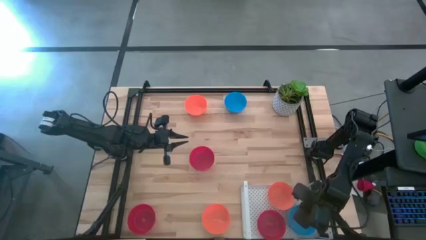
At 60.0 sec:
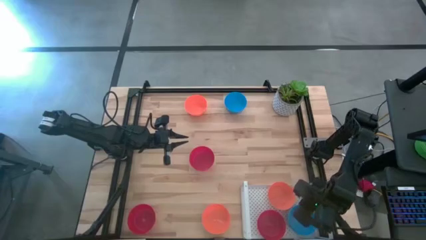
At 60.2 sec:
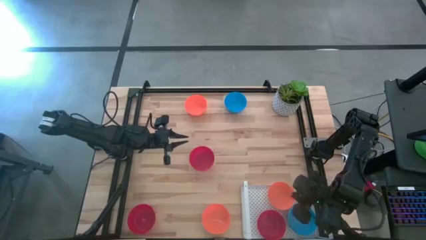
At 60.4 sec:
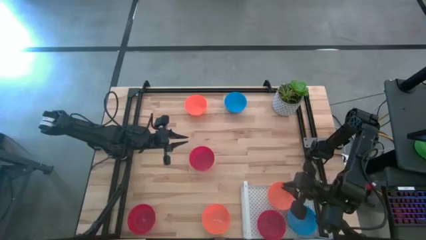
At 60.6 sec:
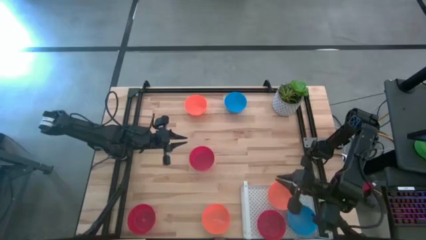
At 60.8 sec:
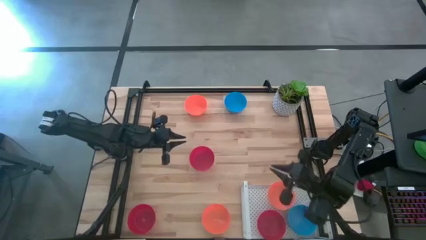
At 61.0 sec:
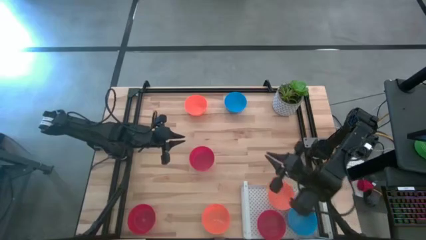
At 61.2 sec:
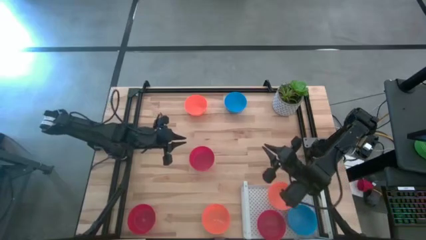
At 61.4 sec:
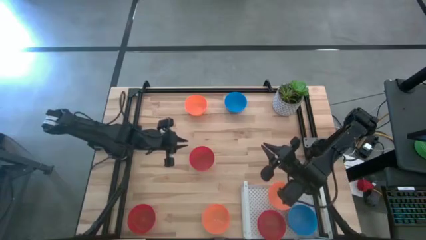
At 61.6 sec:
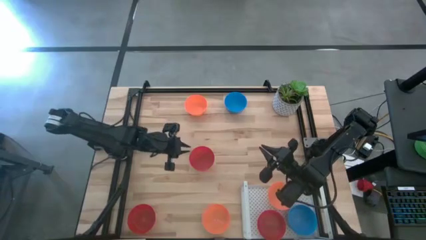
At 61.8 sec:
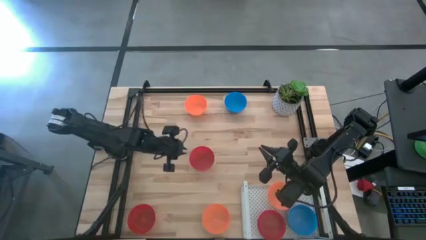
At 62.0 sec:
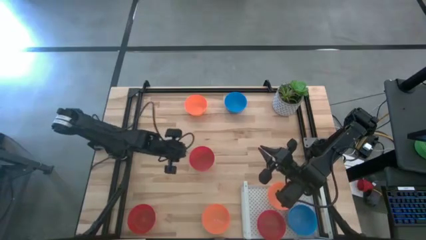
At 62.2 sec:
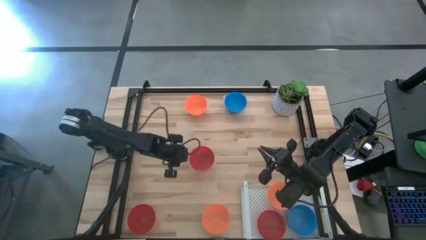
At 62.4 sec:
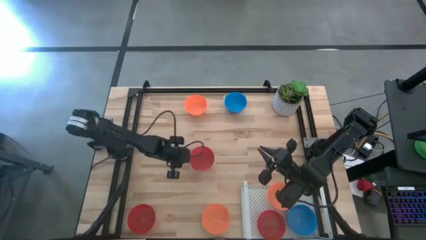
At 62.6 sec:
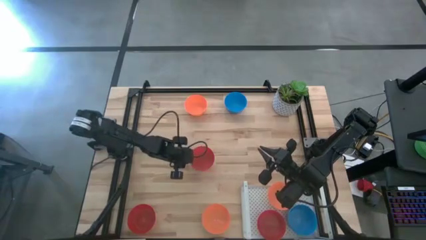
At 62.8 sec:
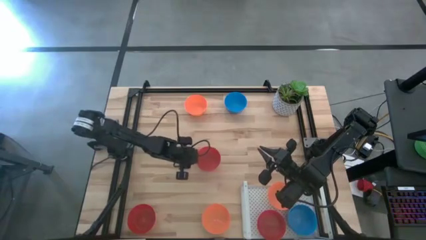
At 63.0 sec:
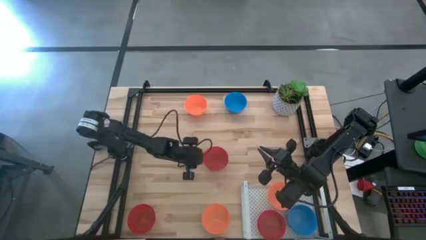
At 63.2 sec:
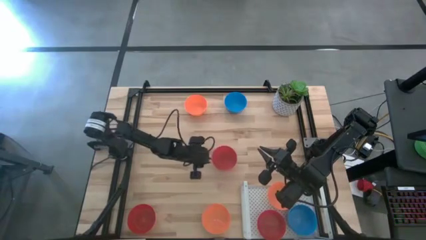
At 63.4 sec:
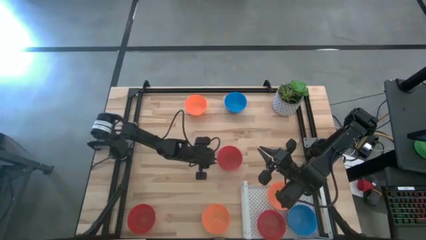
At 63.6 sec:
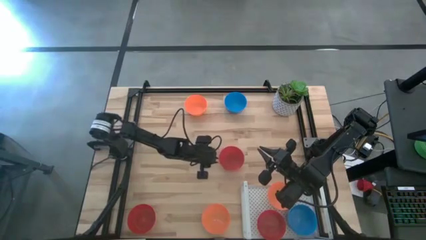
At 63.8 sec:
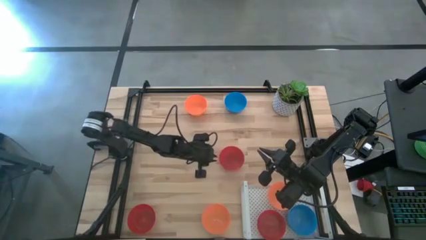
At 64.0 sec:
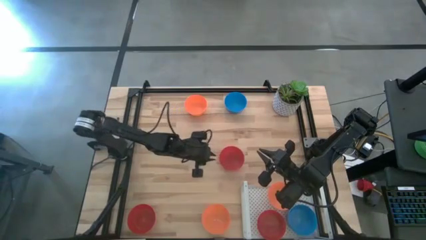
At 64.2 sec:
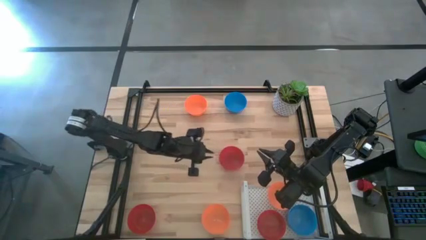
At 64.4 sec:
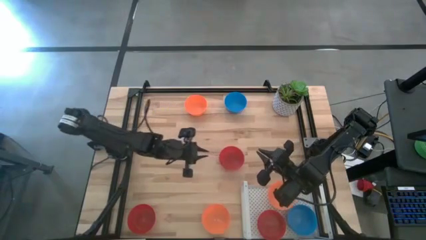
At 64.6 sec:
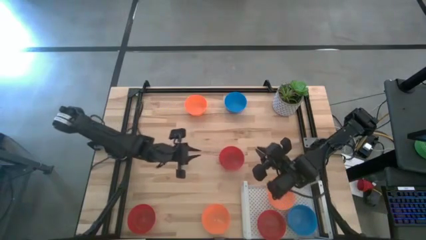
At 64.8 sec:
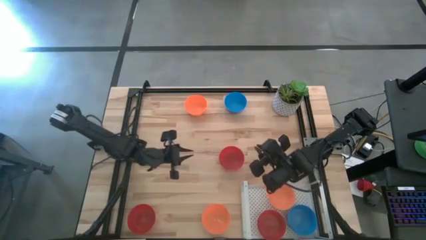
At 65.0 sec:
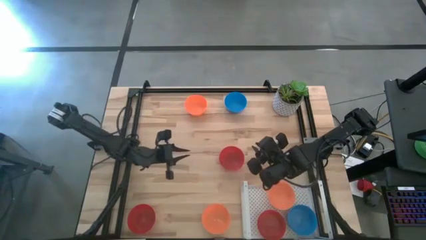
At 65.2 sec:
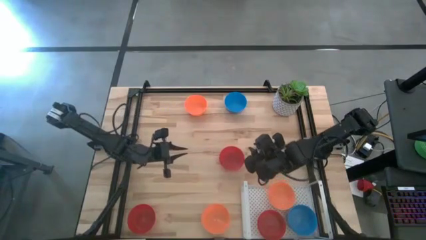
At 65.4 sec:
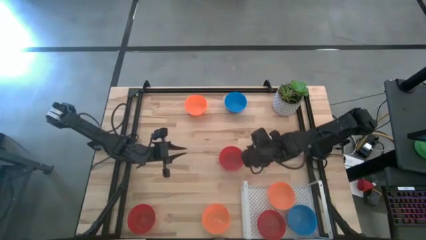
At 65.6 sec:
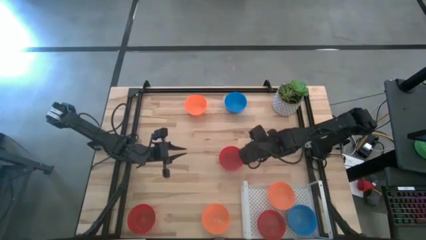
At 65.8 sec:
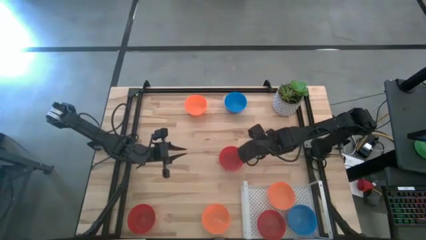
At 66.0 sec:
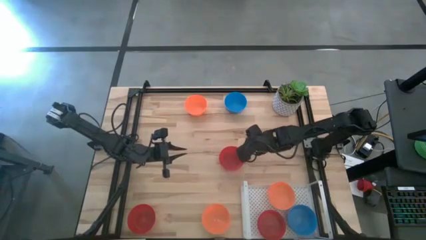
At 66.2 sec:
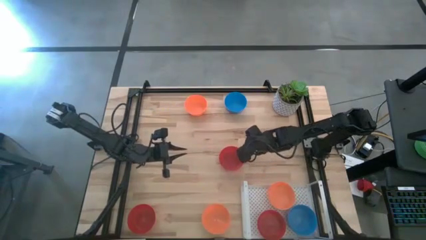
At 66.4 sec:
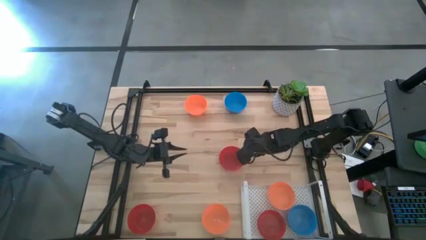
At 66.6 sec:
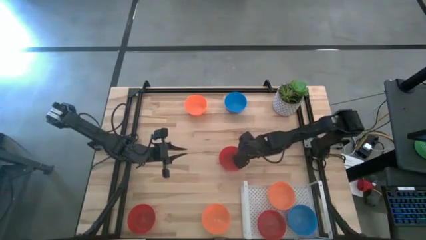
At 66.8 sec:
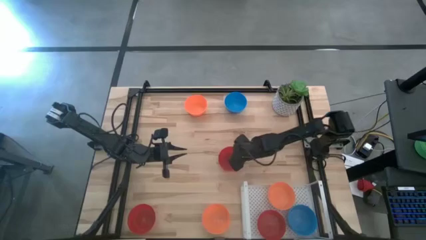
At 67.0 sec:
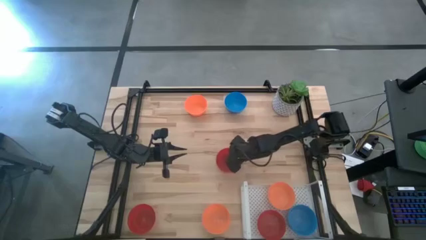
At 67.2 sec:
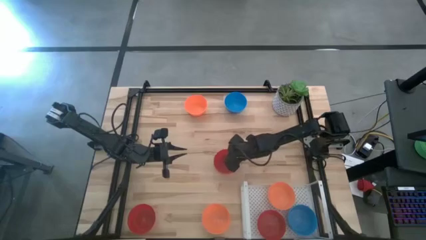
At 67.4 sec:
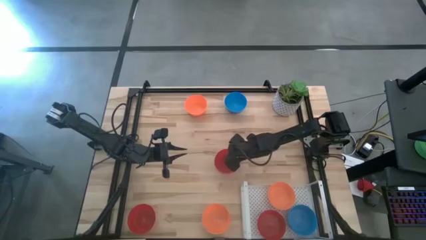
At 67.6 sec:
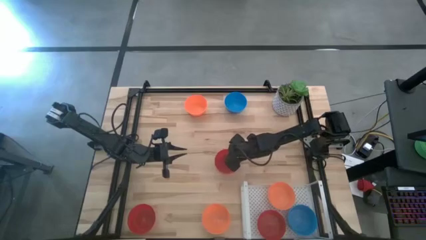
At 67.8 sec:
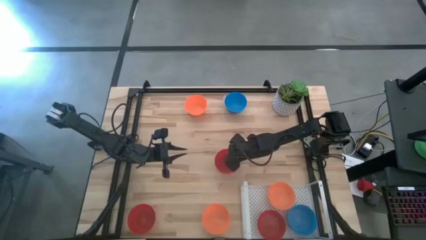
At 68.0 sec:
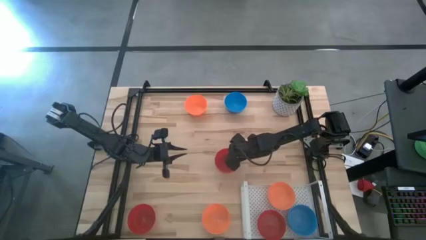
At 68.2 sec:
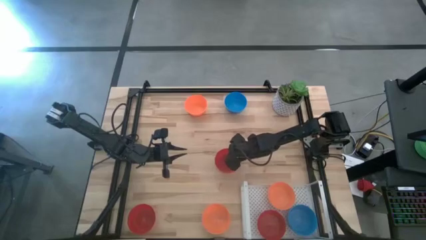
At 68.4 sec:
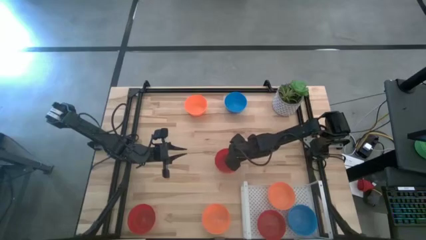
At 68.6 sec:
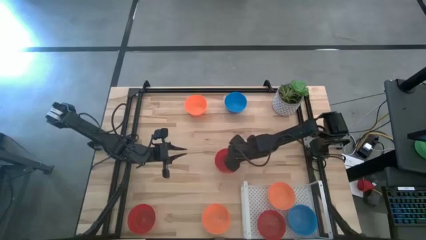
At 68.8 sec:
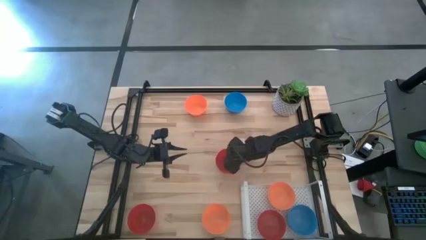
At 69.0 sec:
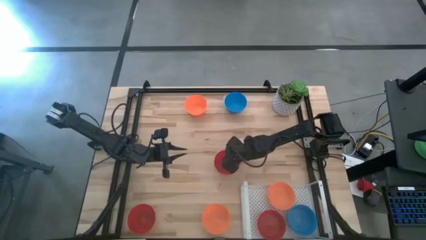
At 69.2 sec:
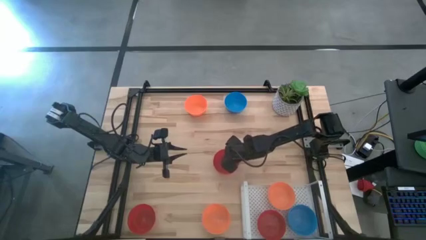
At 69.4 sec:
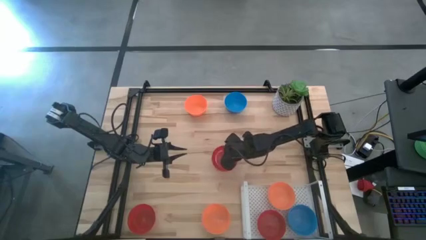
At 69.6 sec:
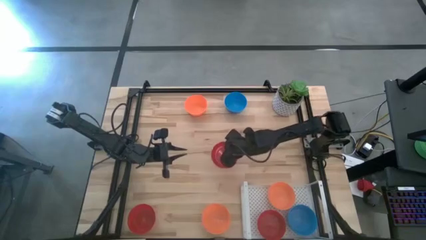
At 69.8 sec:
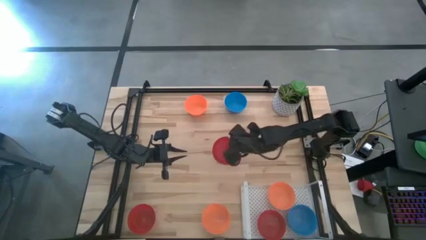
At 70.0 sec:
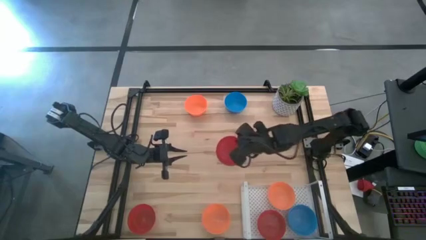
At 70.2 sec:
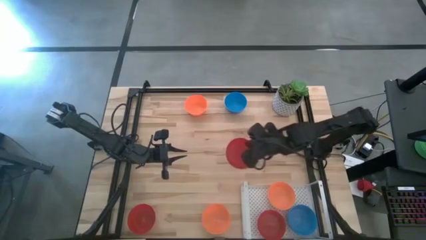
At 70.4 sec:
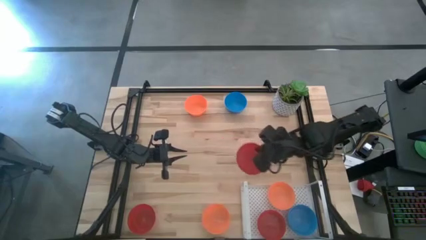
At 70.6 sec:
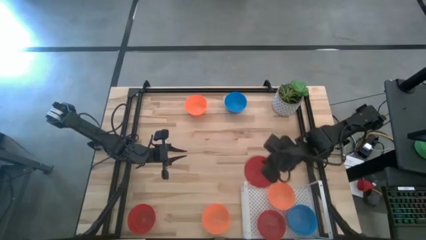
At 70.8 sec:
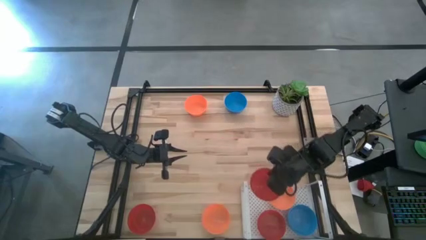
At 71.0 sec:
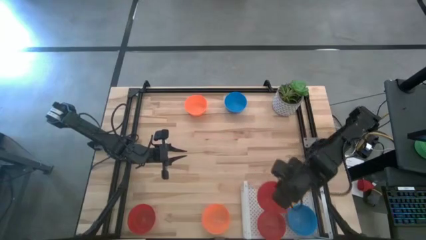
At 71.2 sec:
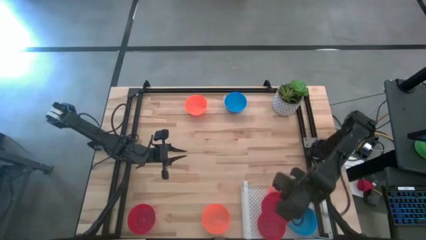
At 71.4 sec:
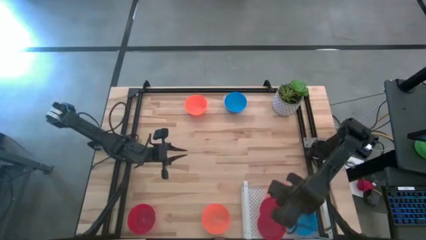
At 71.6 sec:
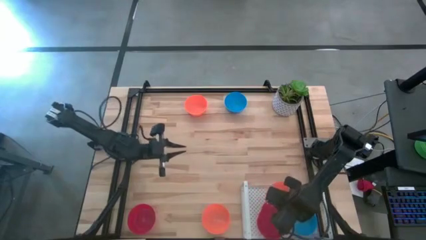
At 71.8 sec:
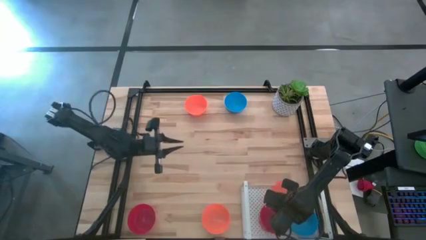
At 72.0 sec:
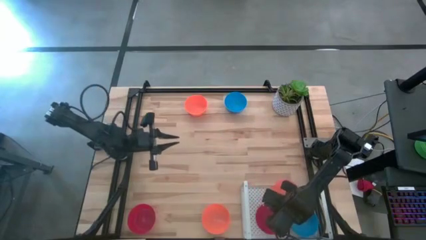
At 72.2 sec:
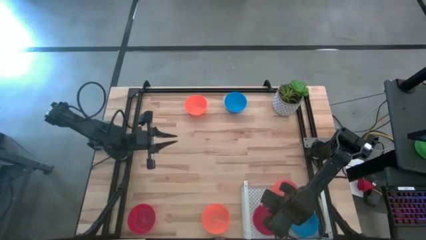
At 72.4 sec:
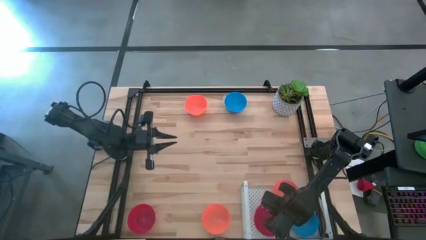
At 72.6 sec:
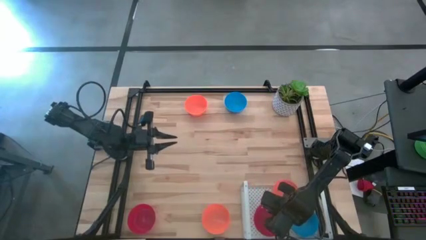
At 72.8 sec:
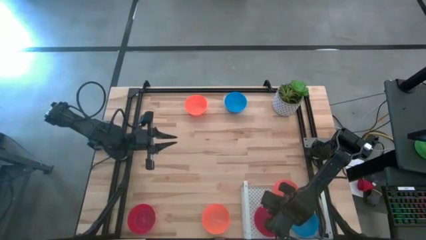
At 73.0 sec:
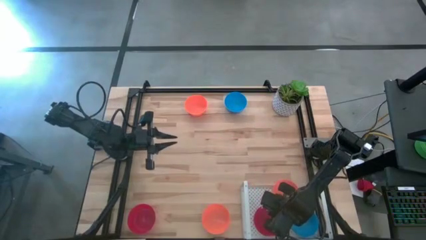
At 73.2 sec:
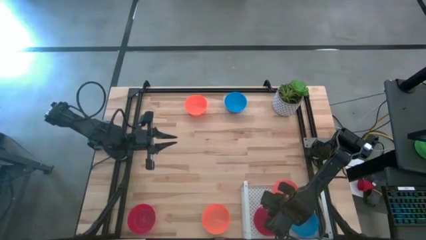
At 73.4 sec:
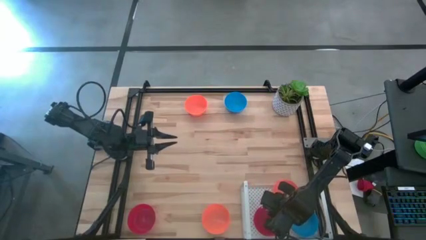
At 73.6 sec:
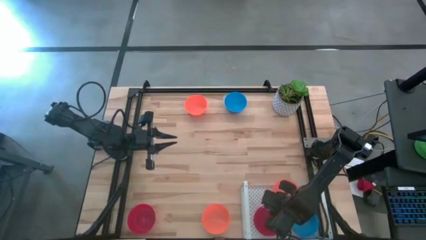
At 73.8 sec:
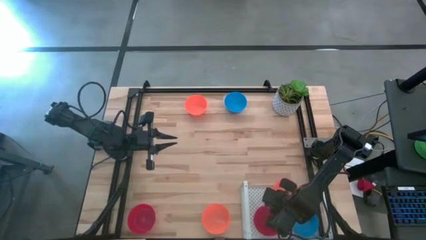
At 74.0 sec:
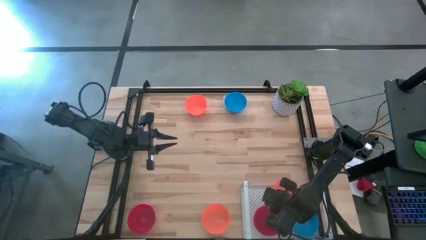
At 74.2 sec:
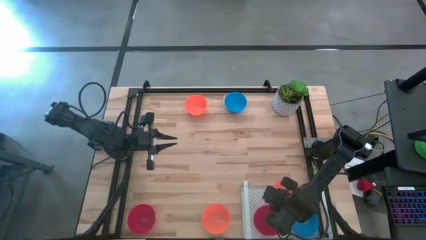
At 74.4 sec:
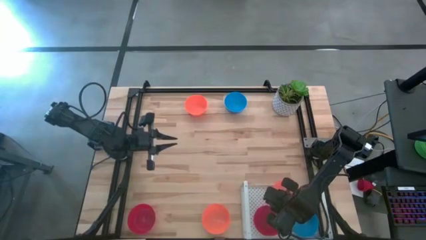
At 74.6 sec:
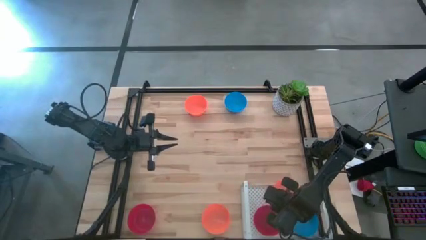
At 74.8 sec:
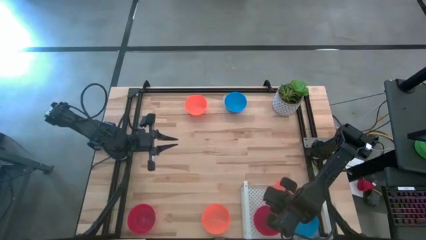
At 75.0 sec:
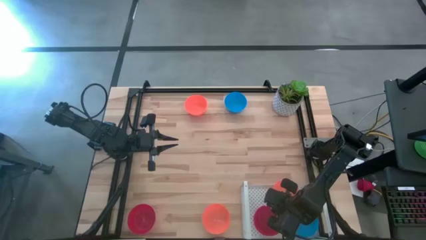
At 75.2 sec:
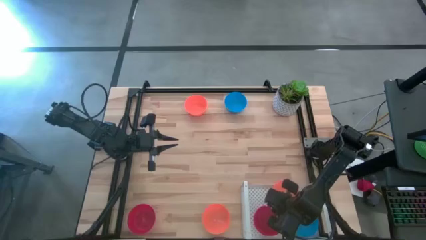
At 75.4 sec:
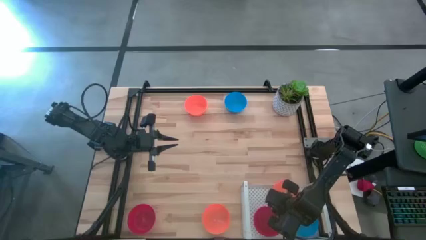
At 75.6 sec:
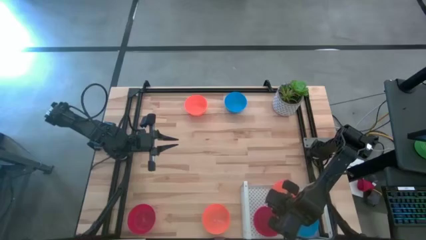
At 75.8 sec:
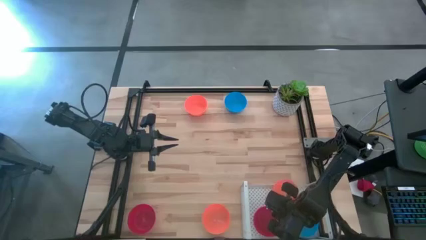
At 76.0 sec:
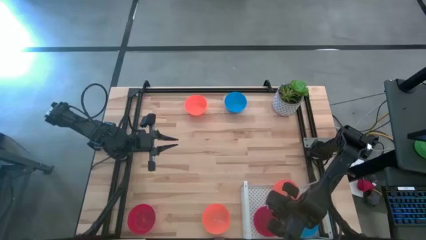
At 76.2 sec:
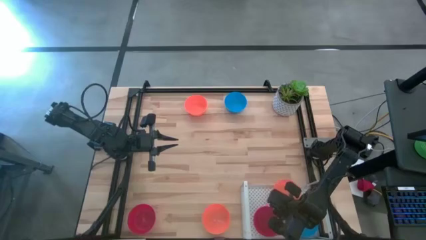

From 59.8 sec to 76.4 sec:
Task: Pick & Place Mini bowls
Stack the top red bowl on top of the red bowl on the shelf

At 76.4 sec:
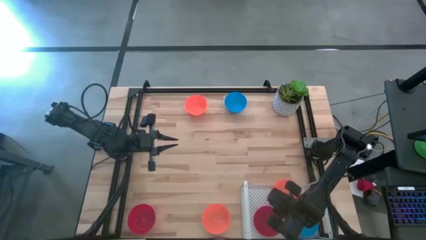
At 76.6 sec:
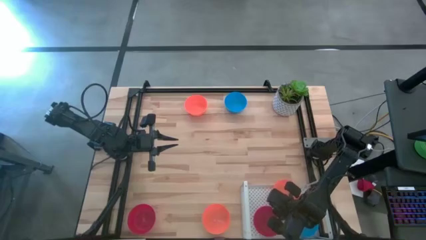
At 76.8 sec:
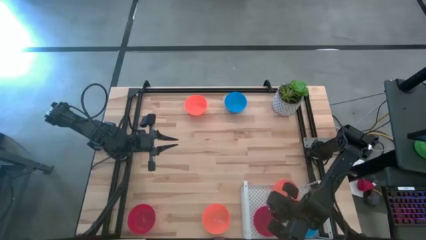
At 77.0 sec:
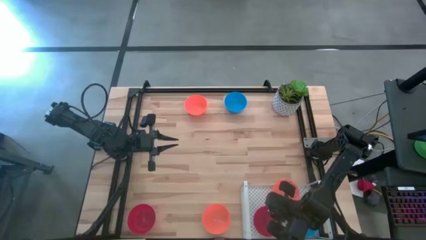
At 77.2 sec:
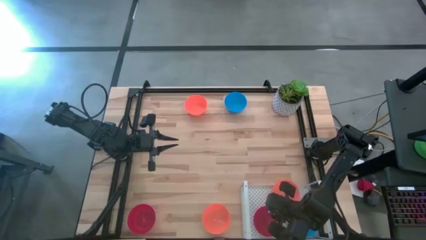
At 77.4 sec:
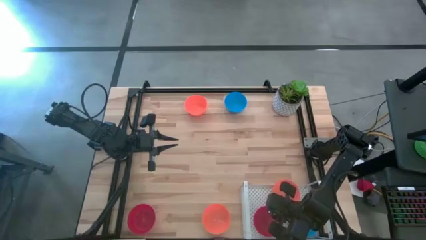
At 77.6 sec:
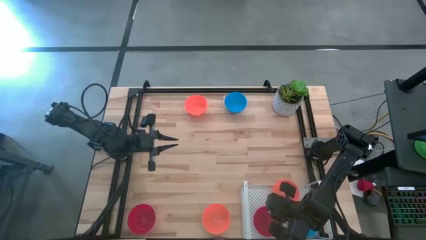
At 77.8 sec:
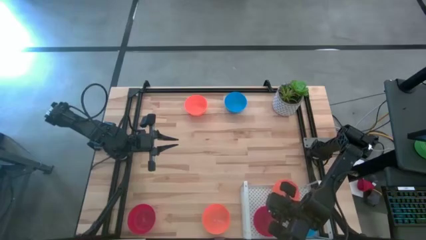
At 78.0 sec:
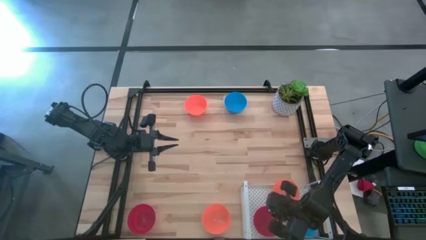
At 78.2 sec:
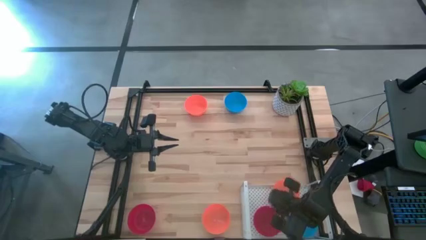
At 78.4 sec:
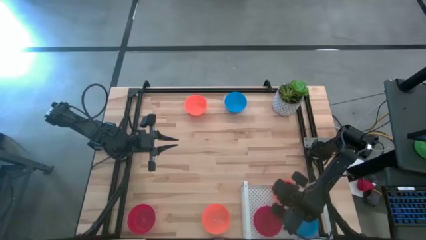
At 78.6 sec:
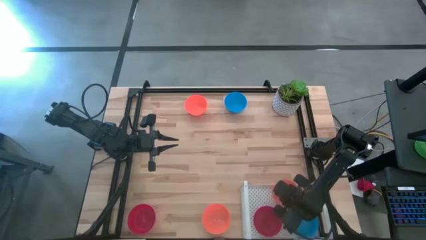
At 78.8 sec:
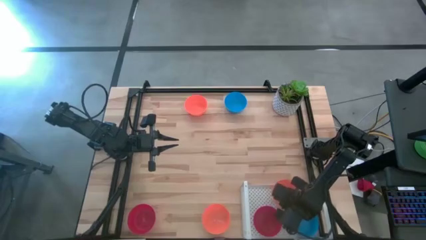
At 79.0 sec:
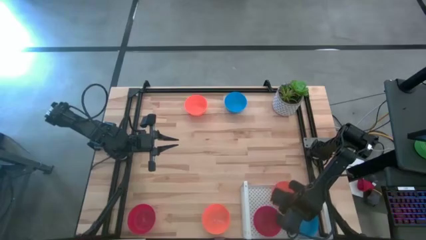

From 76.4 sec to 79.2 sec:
Adjust the orange bowl on the shelf
